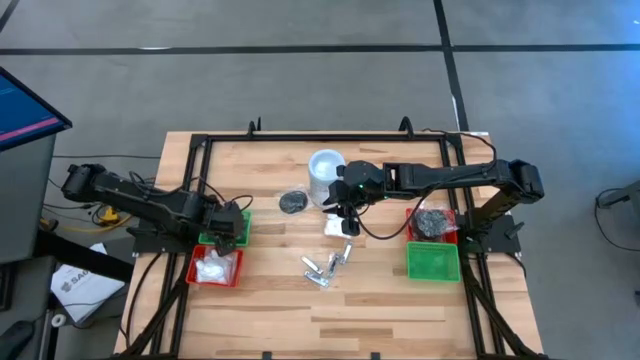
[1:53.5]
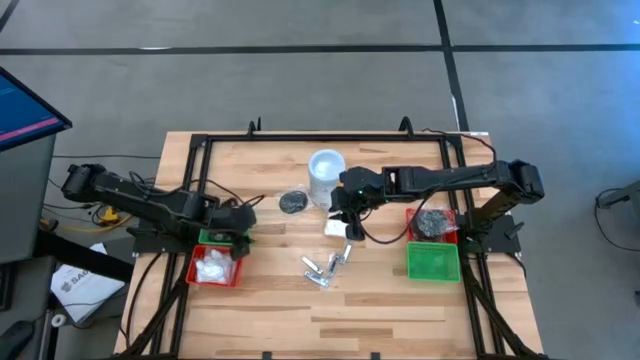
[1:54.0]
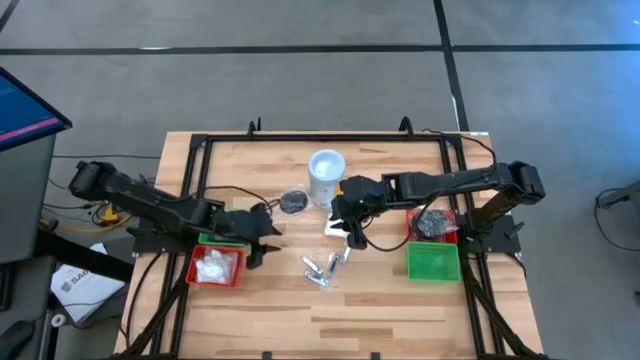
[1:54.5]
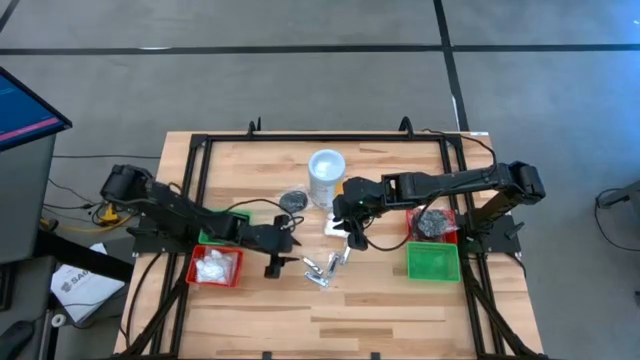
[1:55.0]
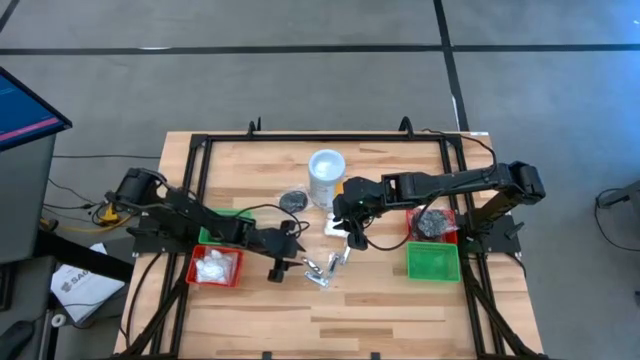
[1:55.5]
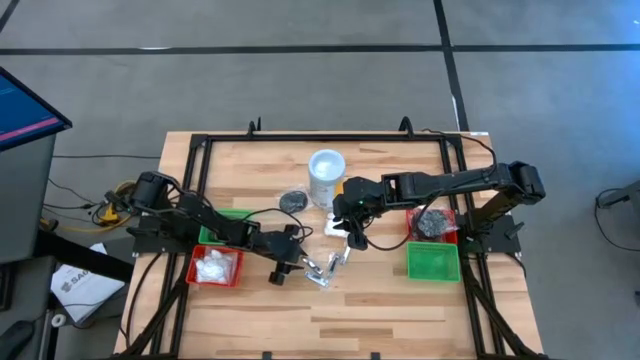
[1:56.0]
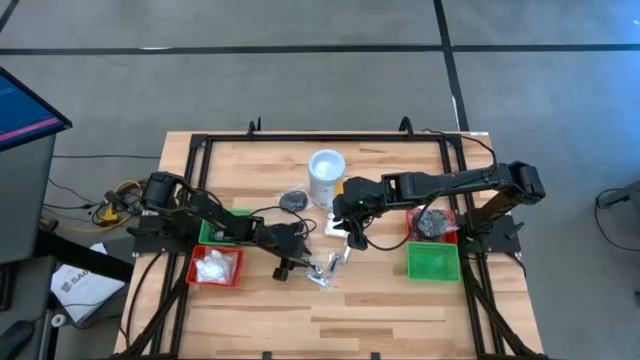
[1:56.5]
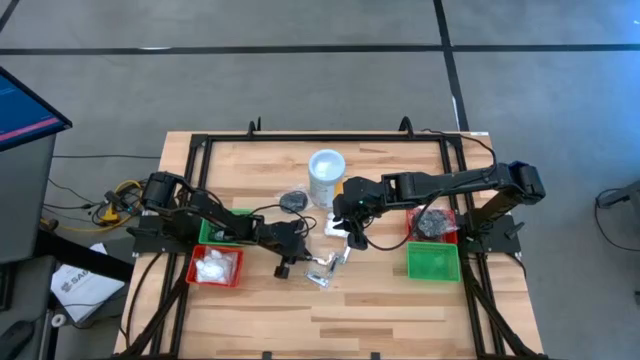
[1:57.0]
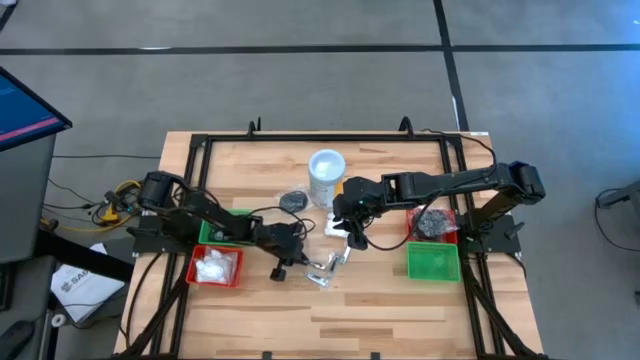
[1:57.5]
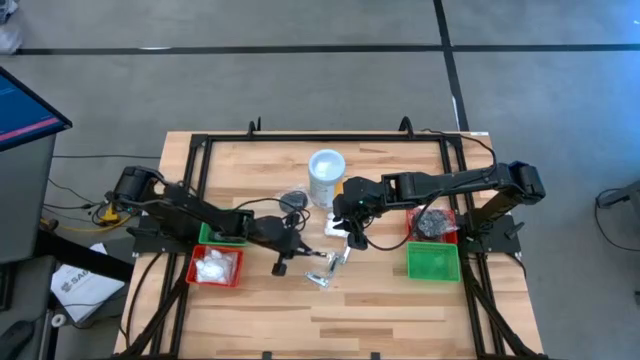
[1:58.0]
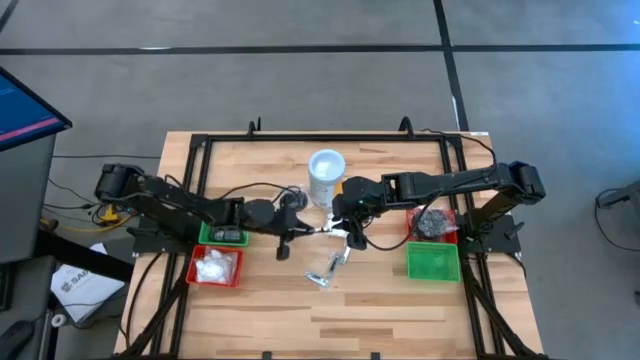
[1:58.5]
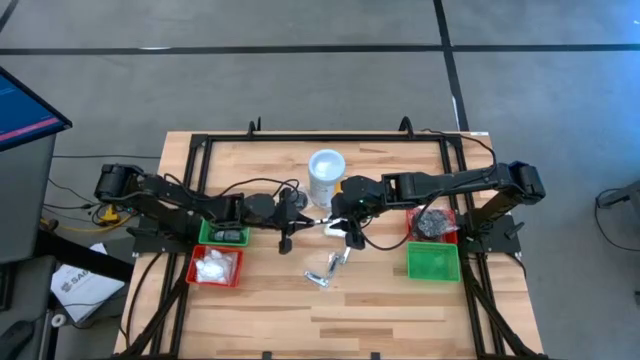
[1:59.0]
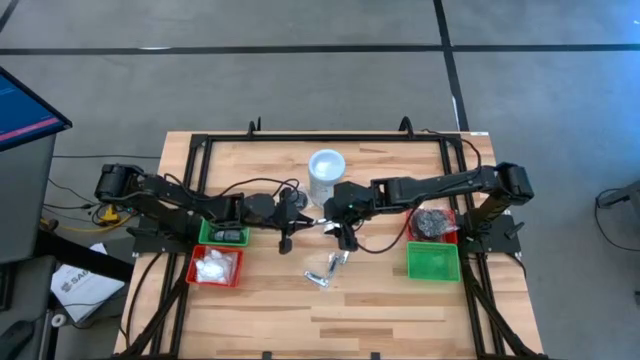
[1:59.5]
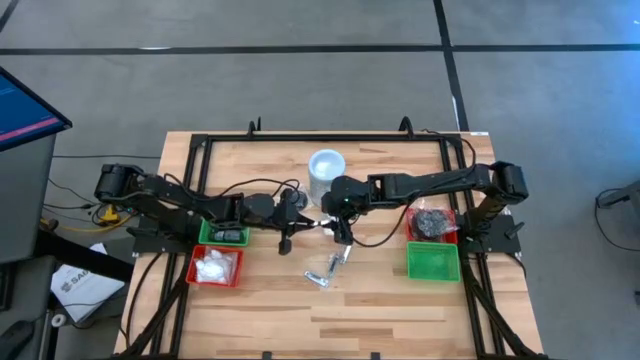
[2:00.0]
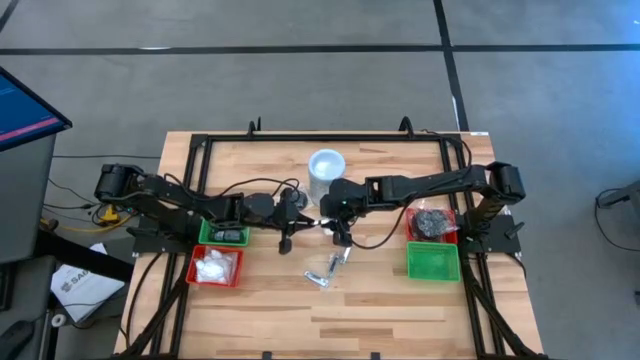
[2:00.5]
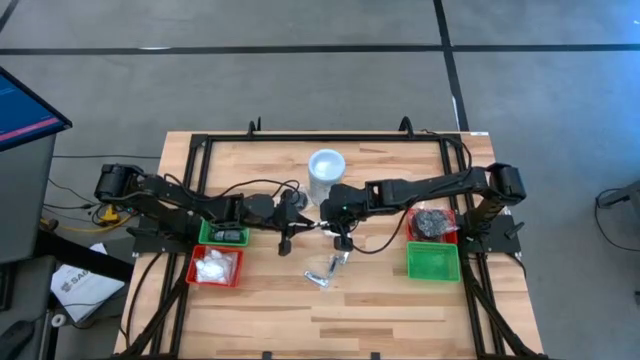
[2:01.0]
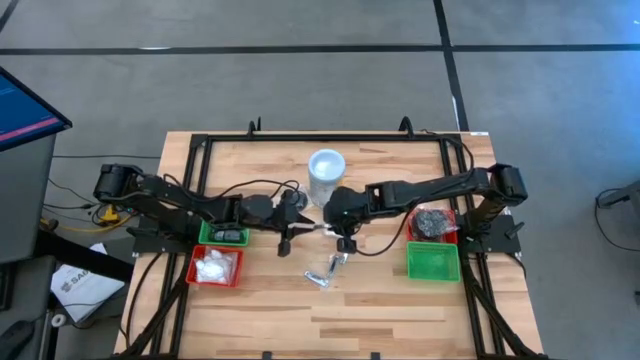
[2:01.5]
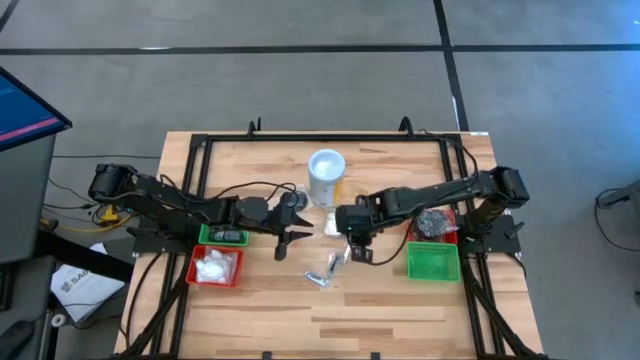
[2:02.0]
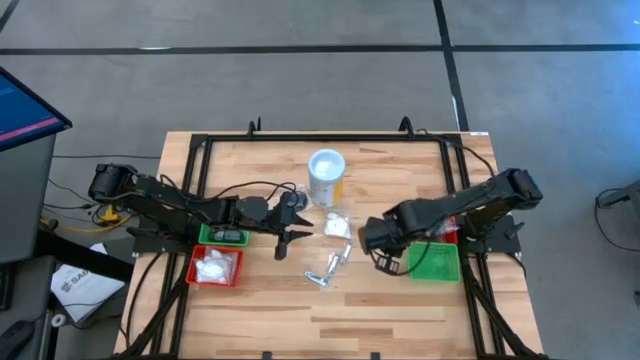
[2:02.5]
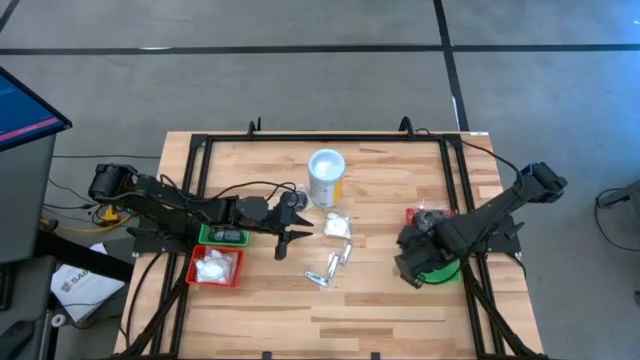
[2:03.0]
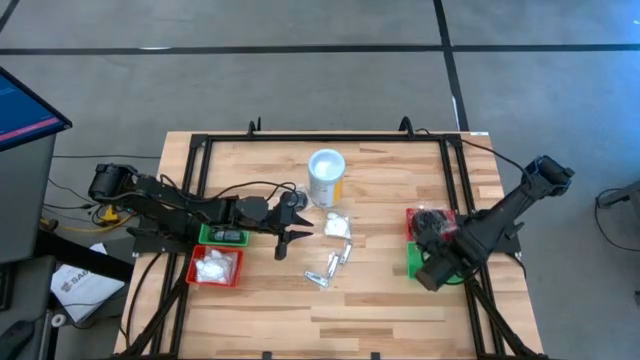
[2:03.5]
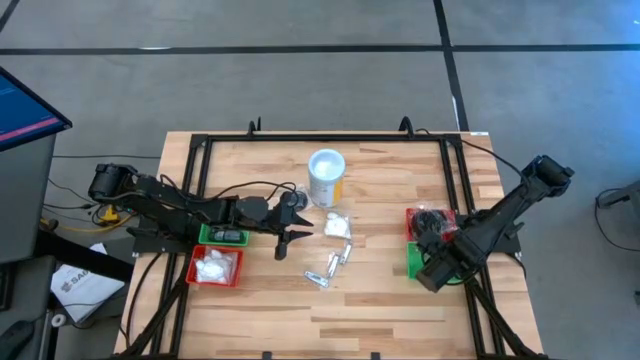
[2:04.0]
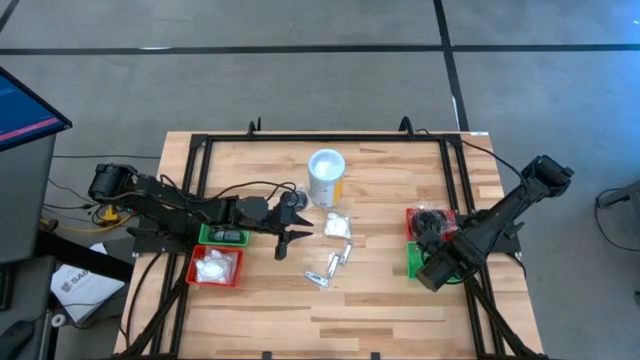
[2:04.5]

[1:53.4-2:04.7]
Task: Pick & Place Travel size toiletries
Put the nail cutter into the right green bin

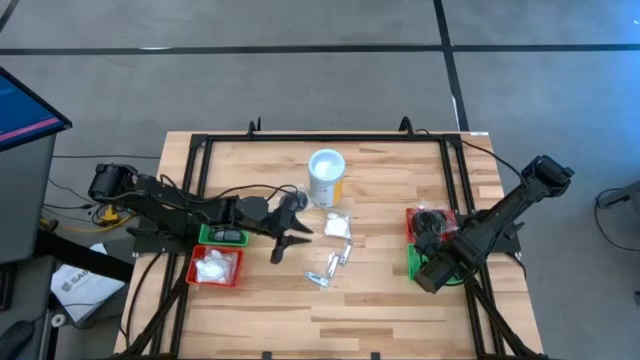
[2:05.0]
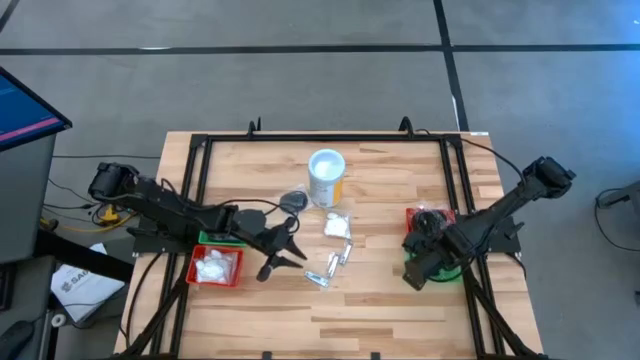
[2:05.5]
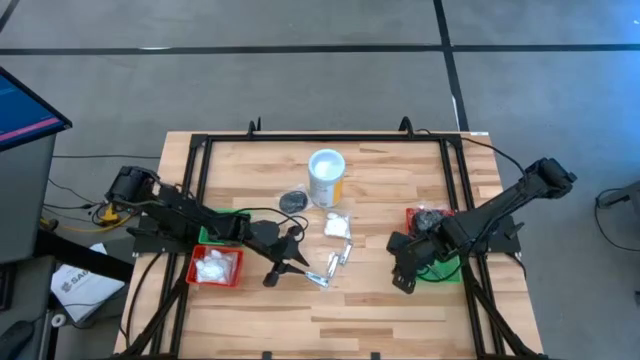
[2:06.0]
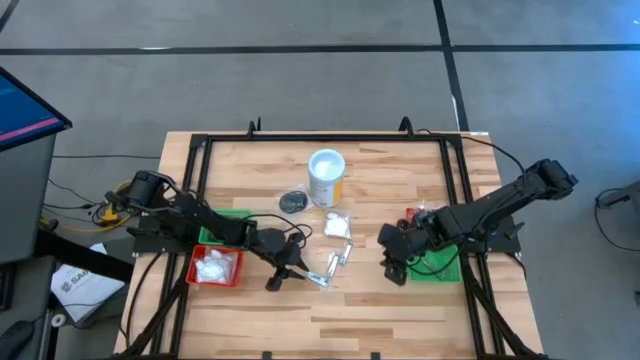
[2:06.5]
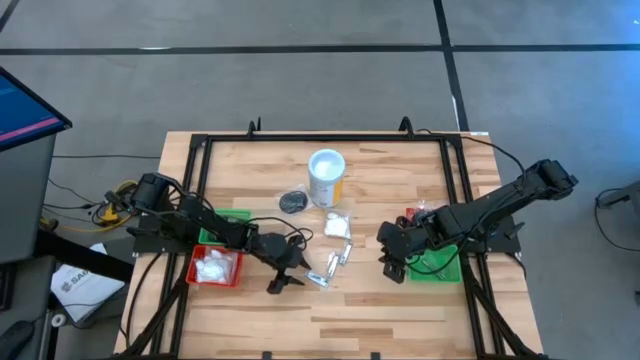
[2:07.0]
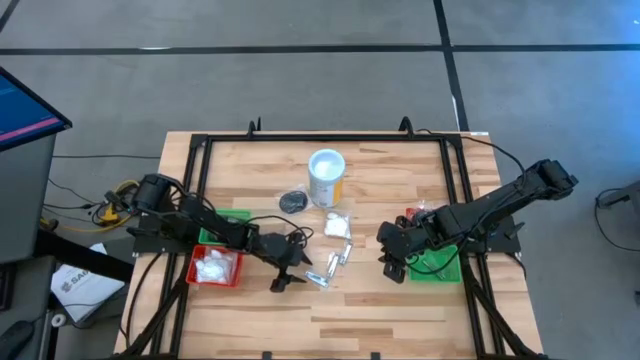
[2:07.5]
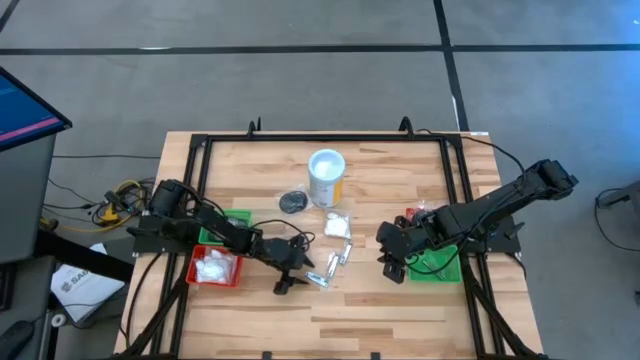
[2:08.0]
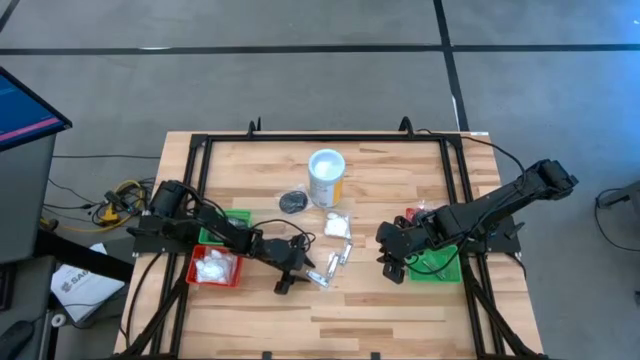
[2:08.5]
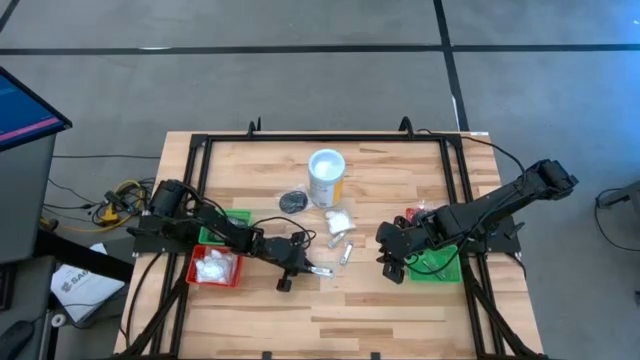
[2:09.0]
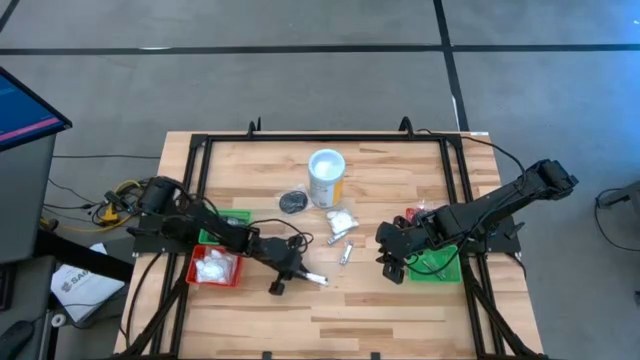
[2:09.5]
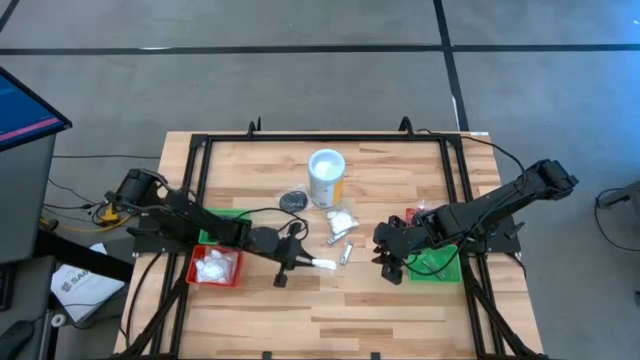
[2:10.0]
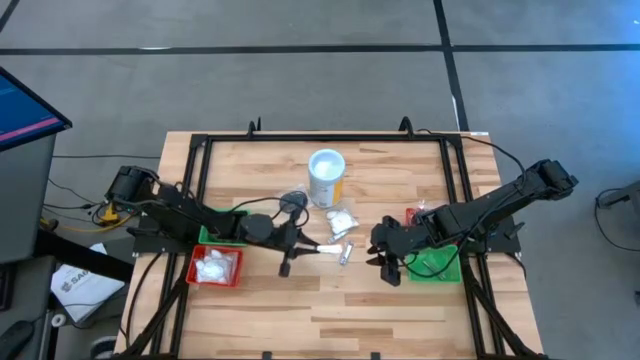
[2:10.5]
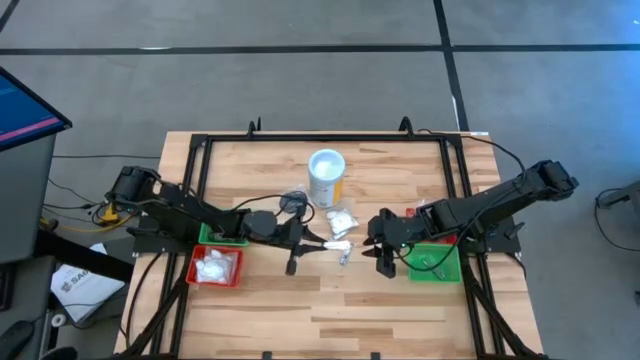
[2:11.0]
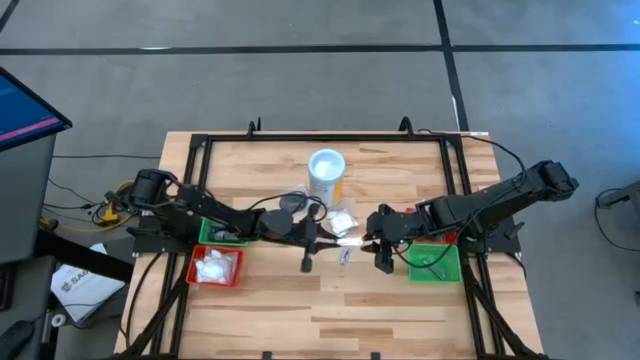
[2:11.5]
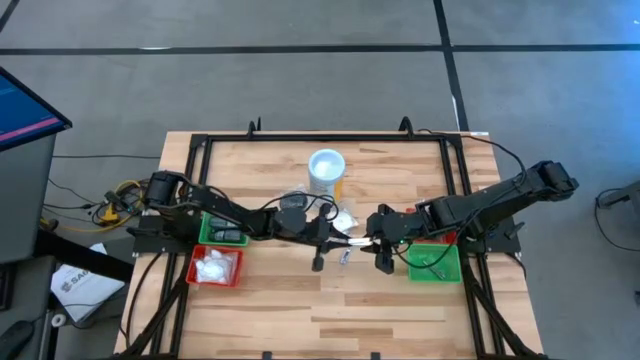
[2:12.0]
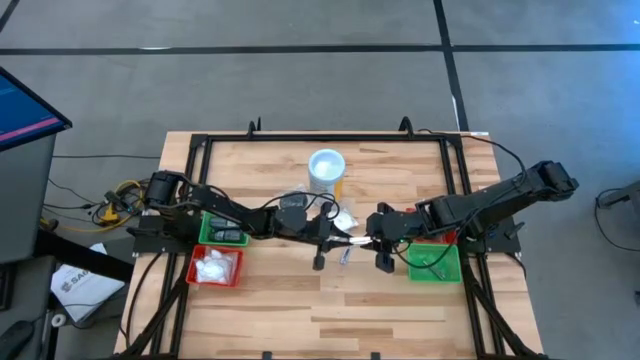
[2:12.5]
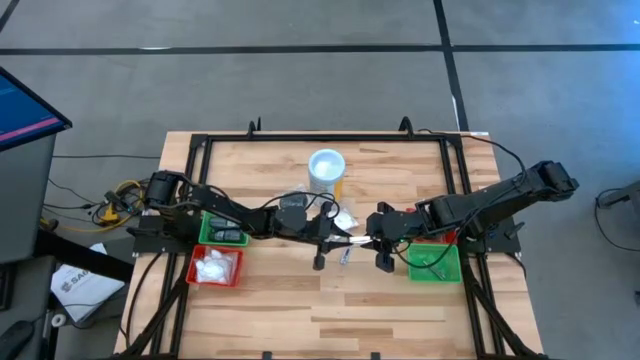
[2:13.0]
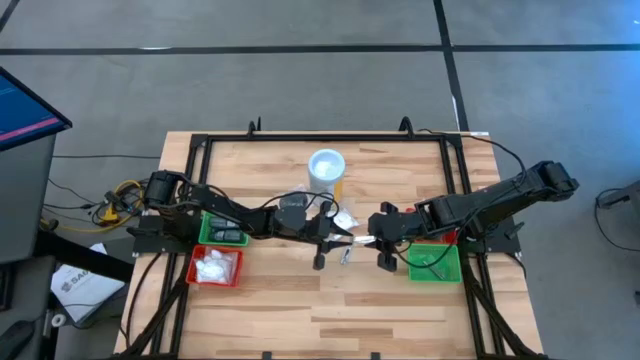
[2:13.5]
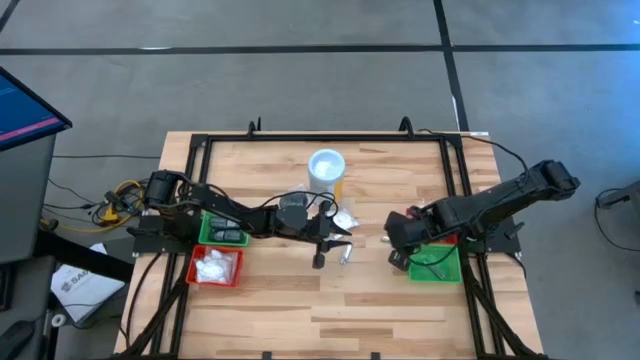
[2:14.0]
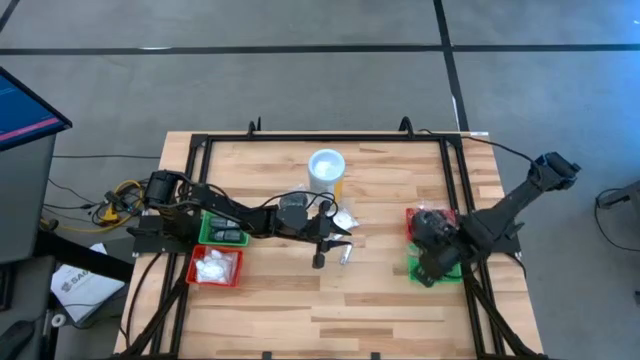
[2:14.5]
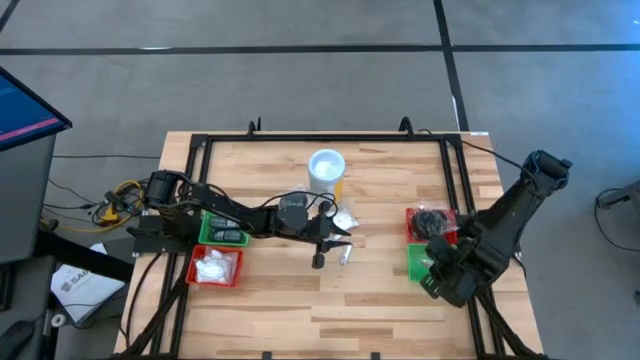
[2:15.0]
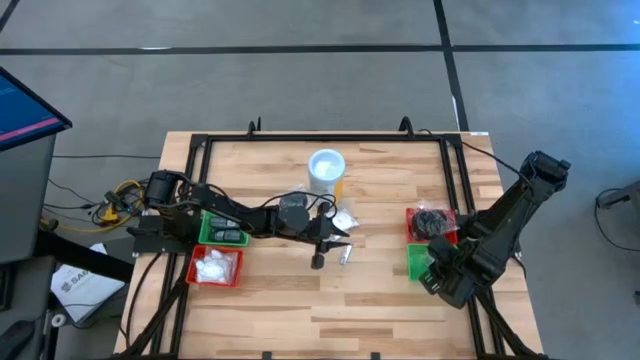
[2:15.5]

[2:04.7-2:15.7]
Put the nail cutter into the right green bin

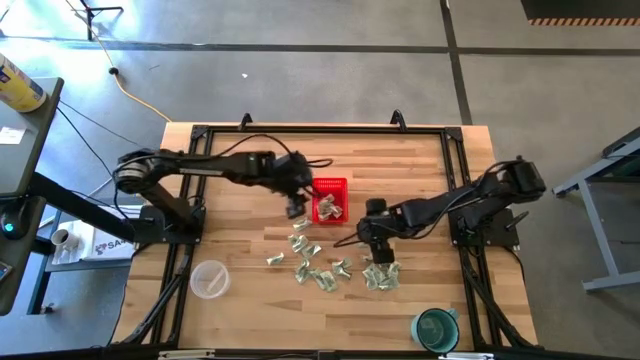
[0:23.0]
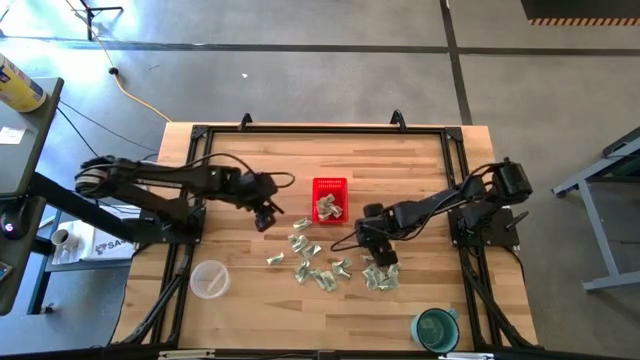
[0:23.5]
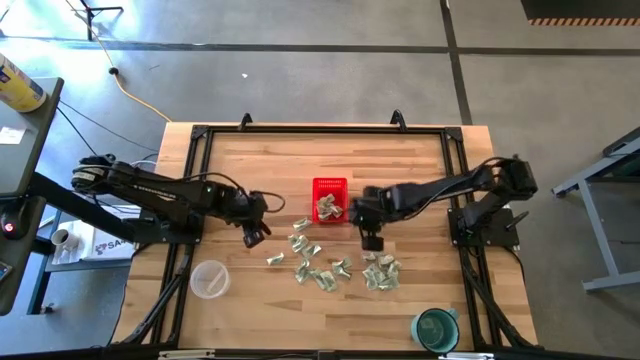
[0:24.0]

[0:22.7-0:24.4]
Task: Pick and place items into bin
Put the light green stevia packet into the red bin
